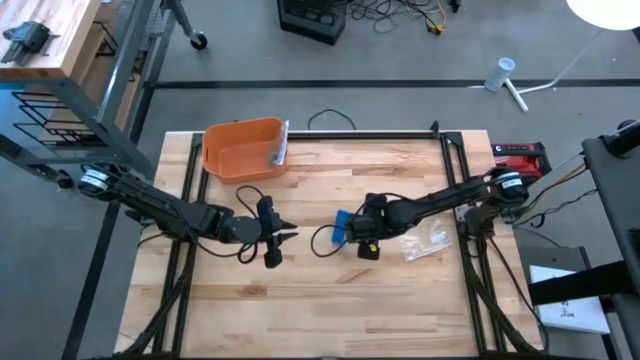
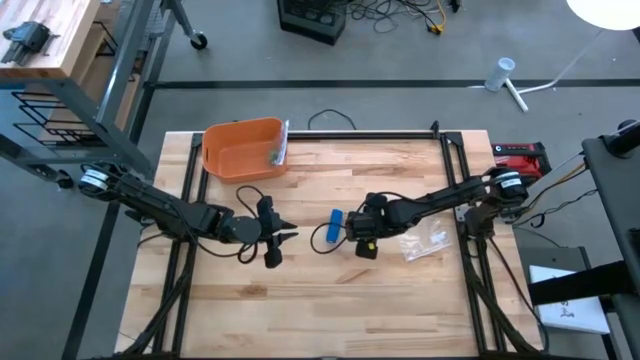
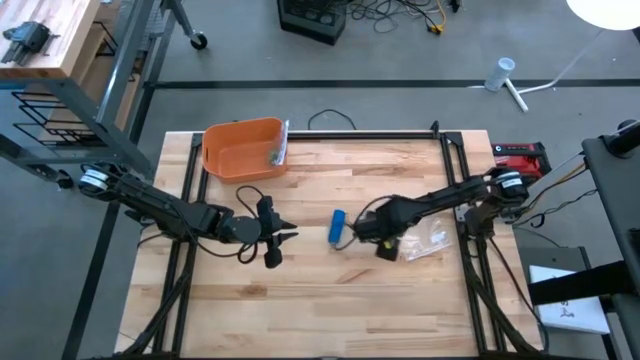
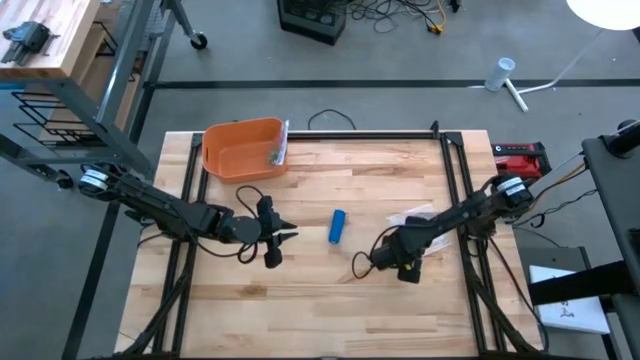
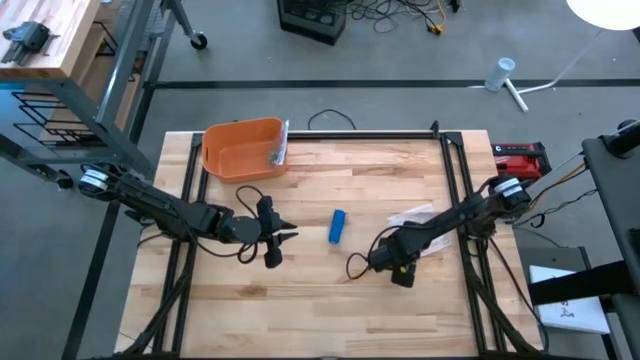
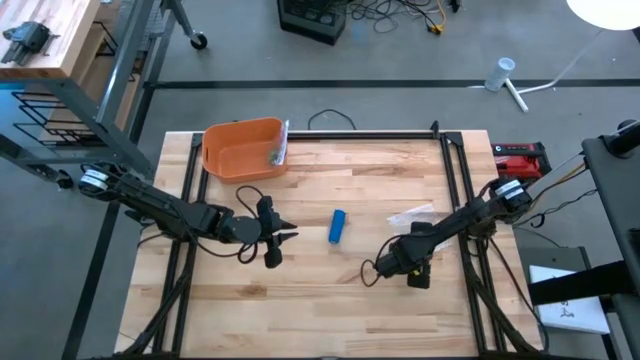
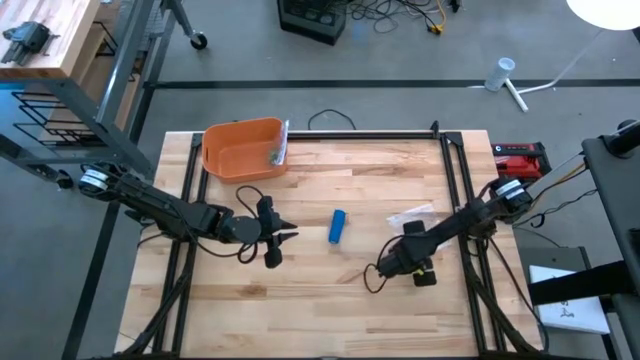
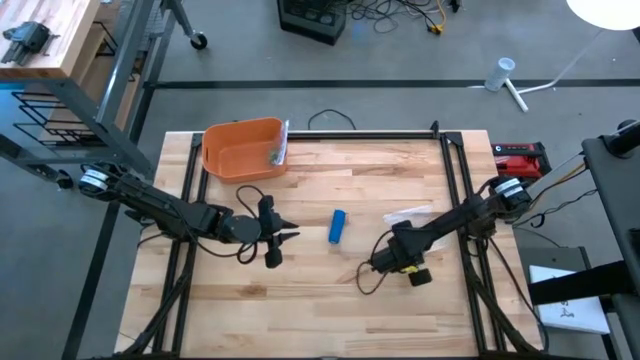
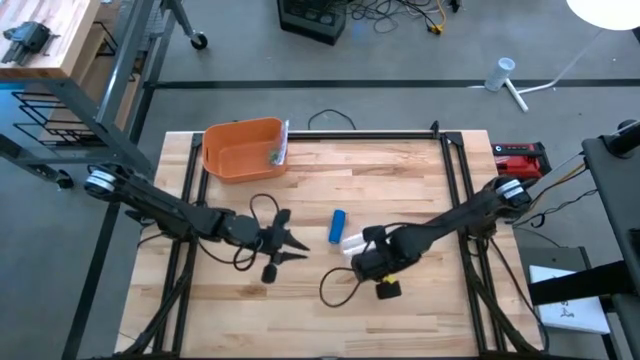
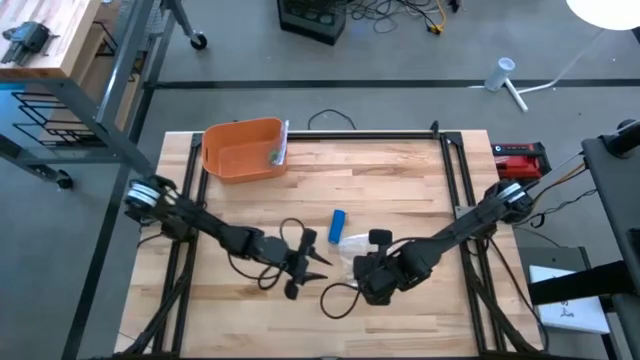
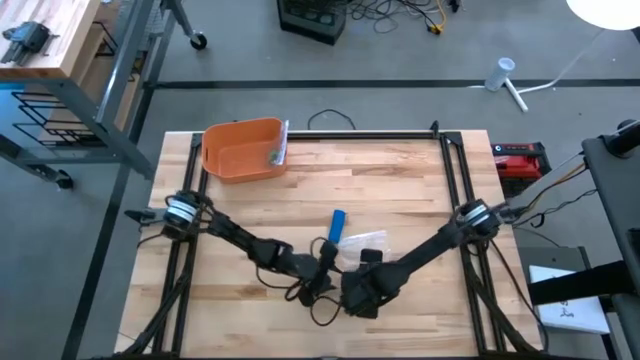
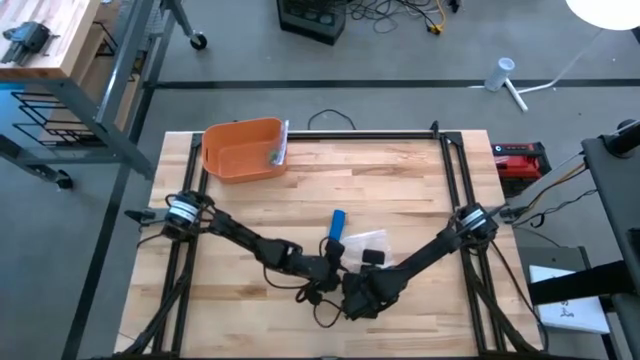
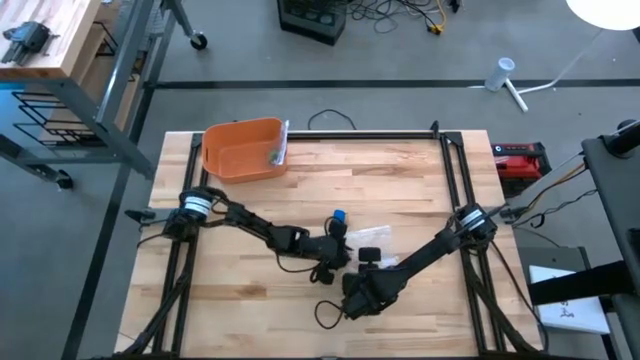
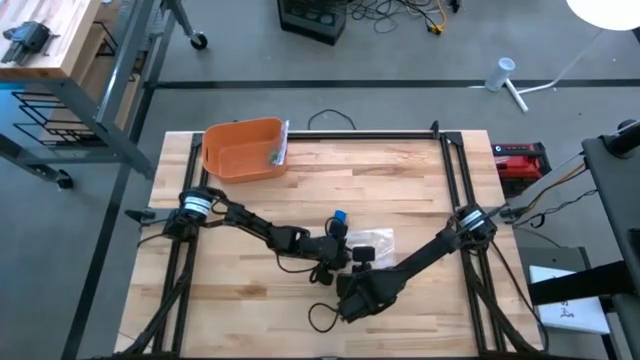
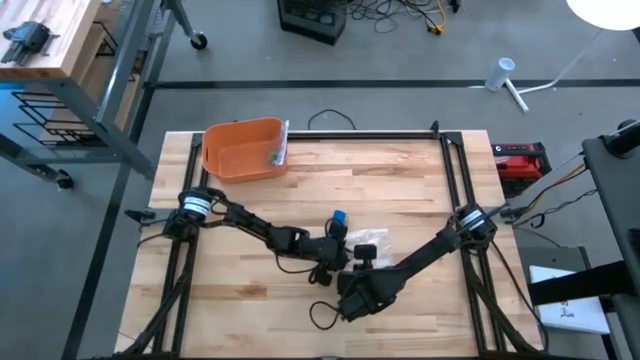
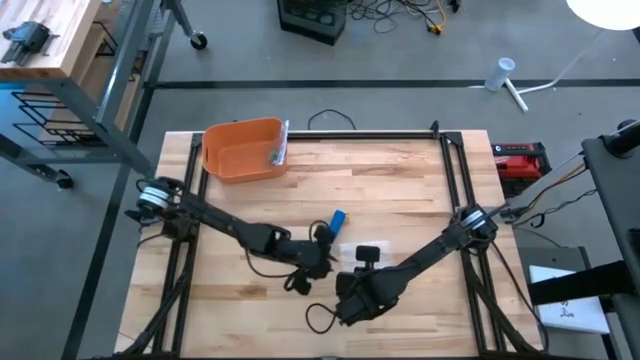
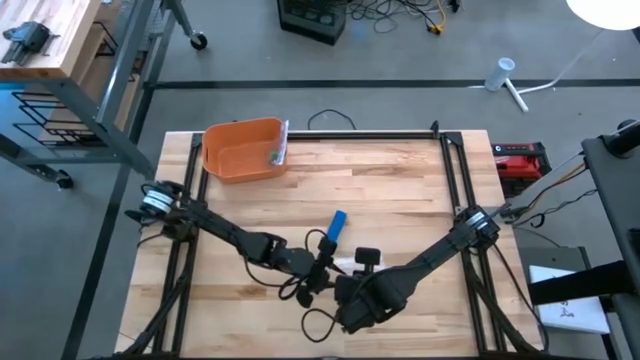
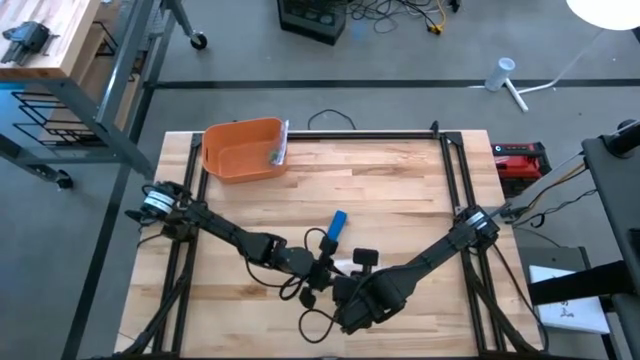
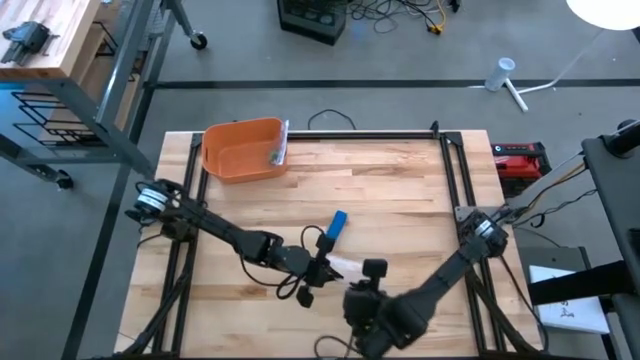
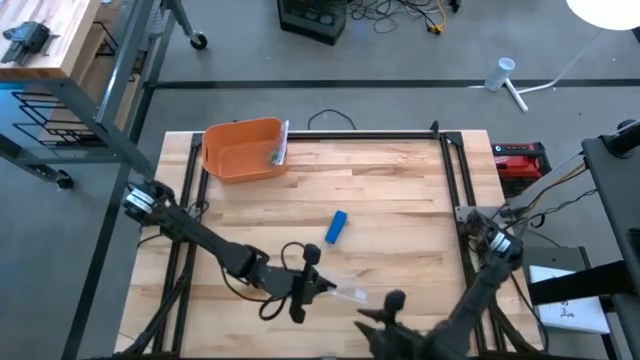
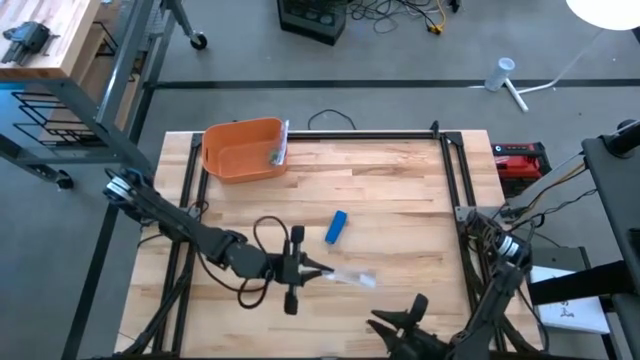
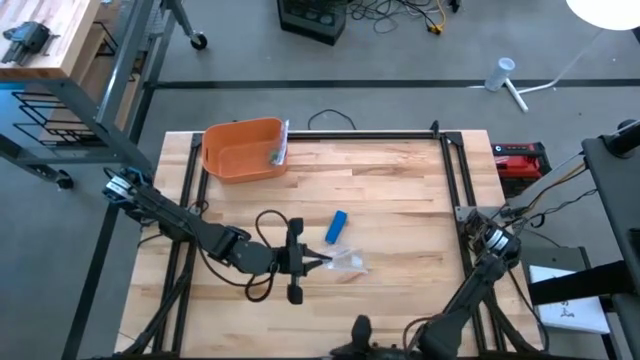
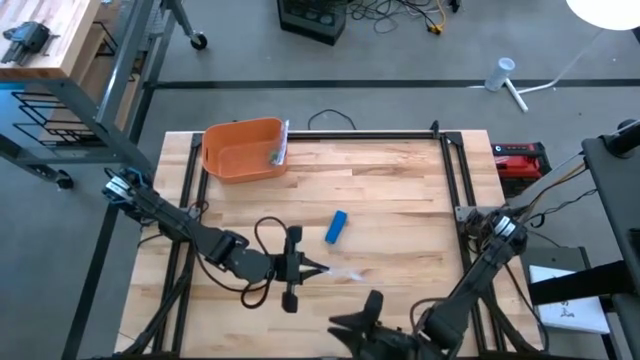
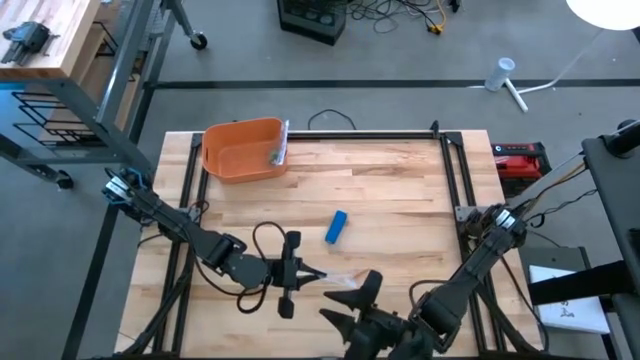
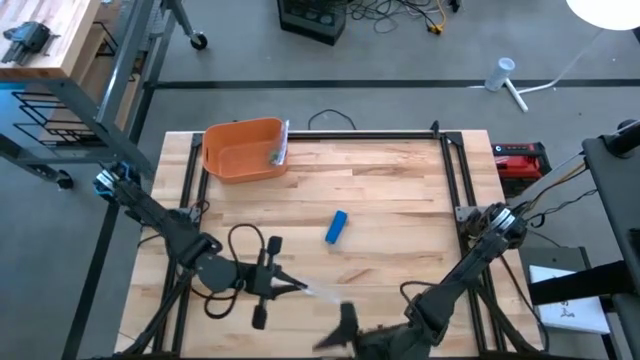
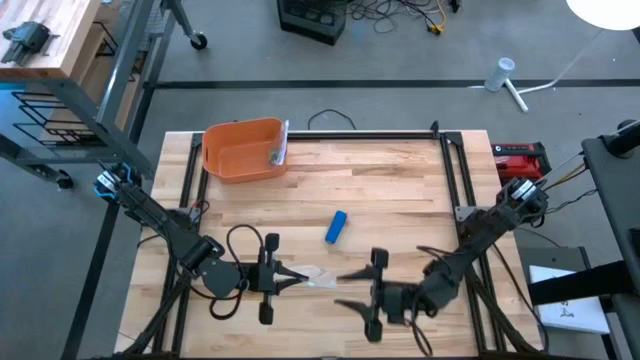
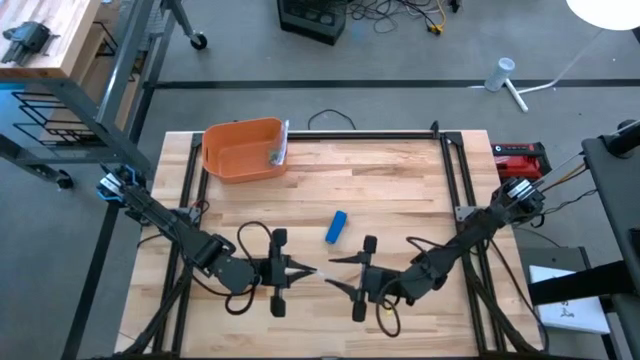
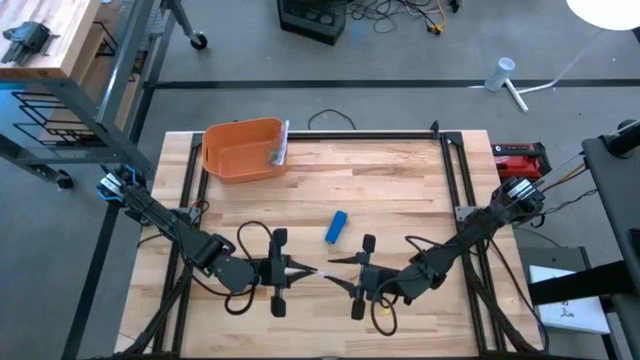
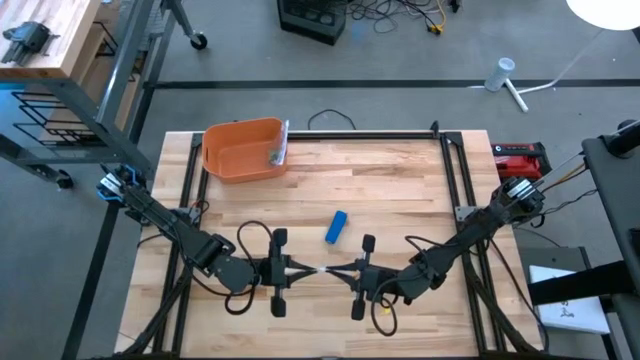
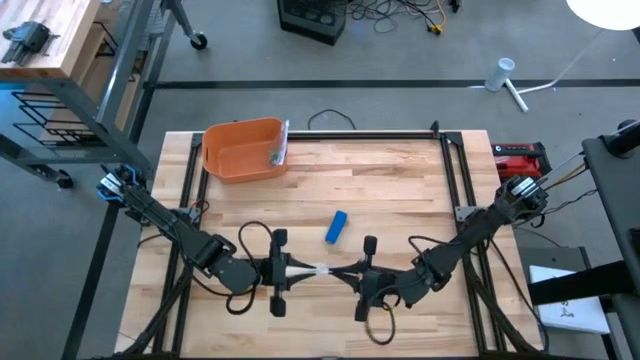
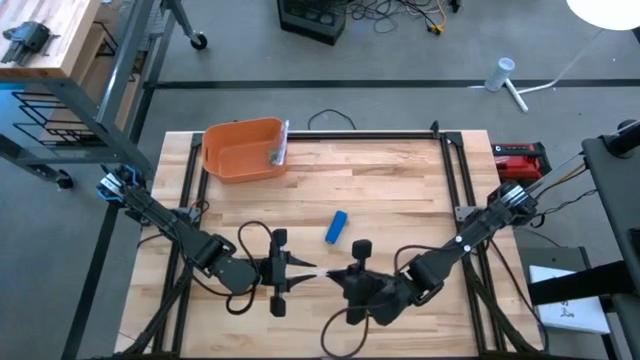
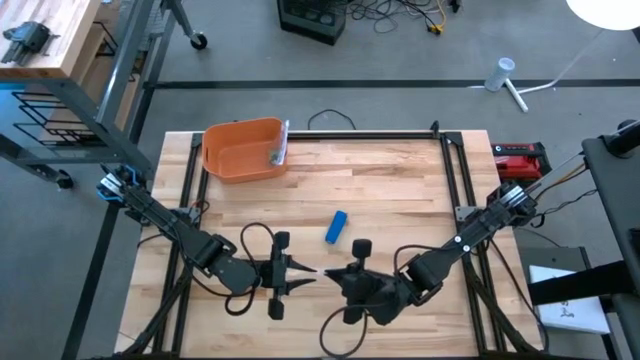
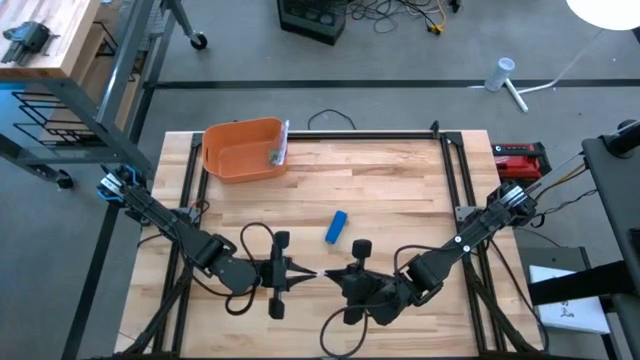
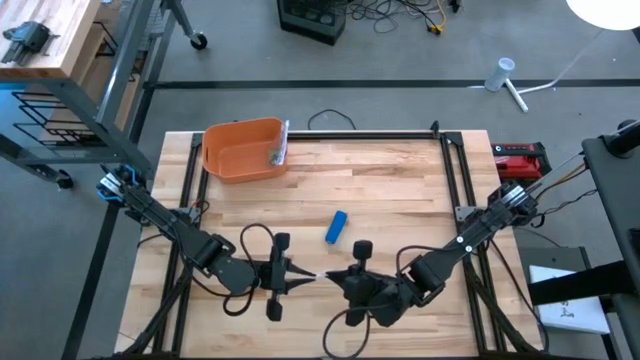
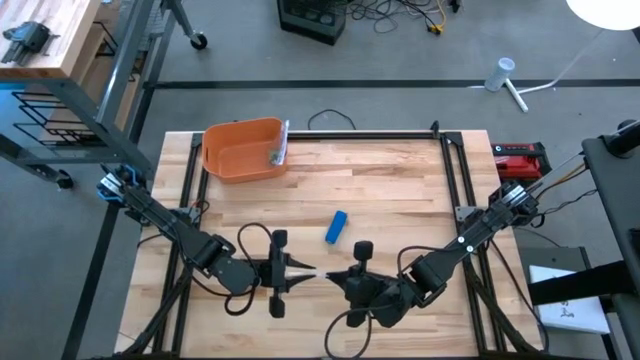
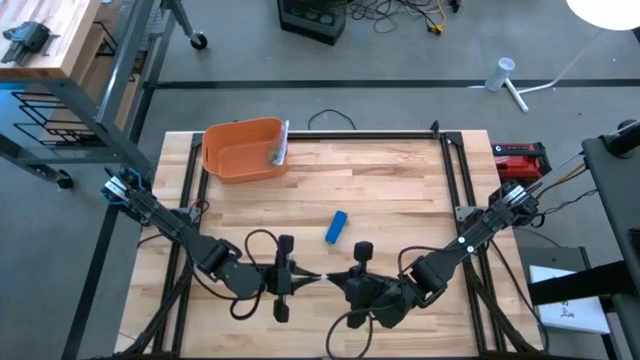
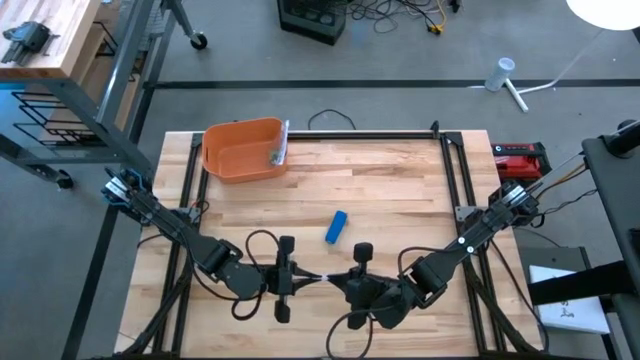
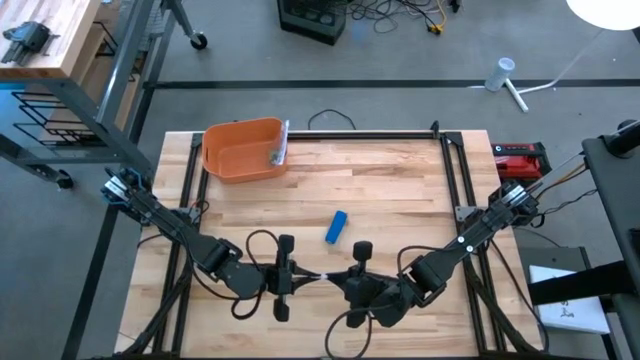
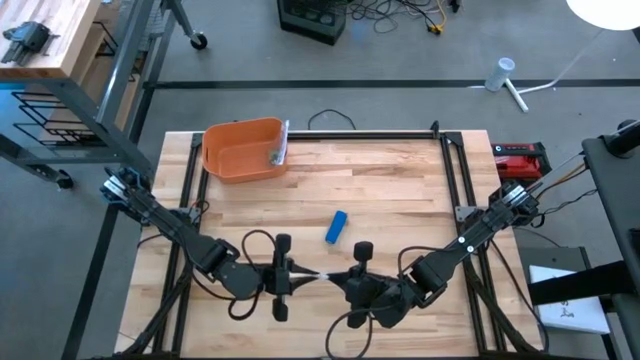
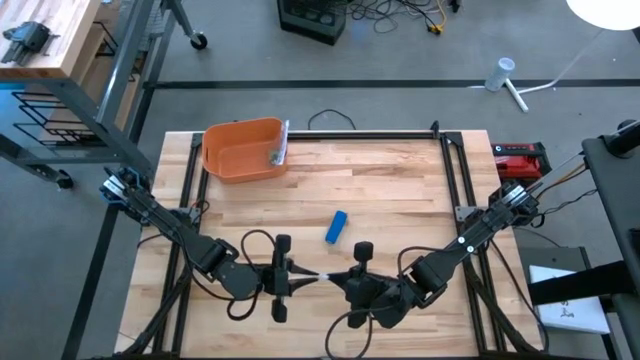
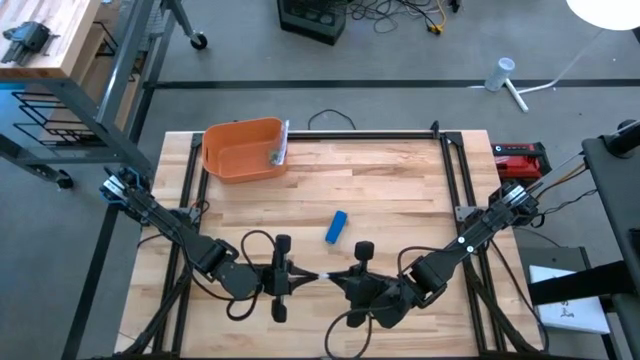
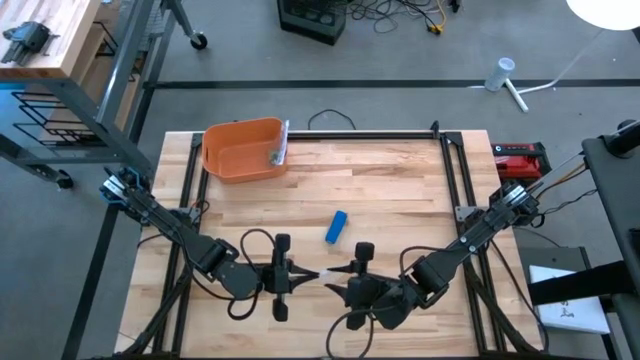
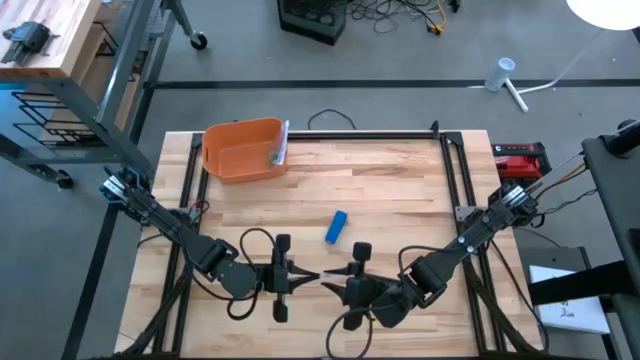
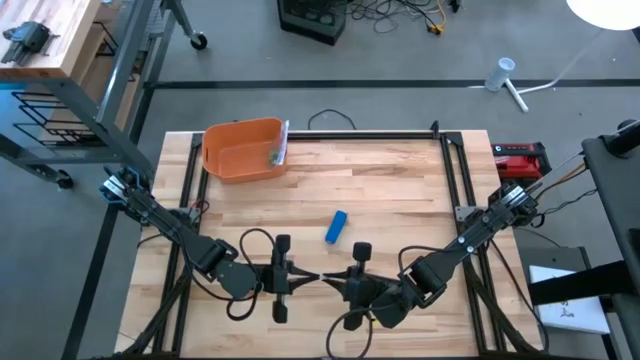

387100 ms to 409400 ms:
Task: Roll bandage
Open the transparent zip bag
